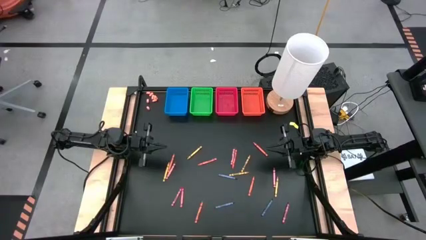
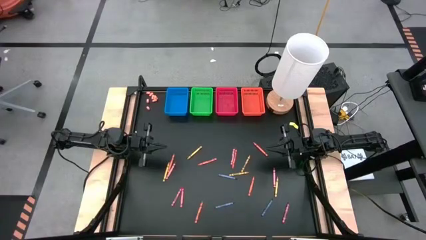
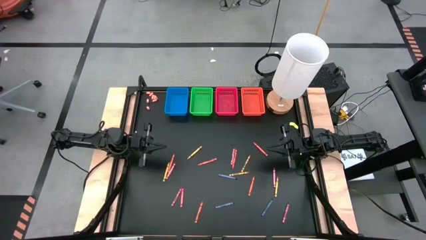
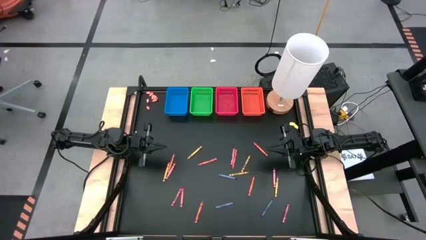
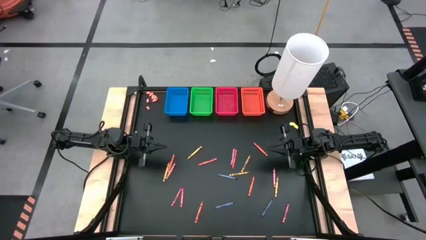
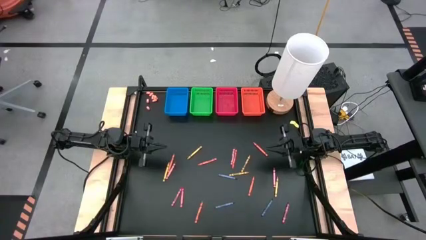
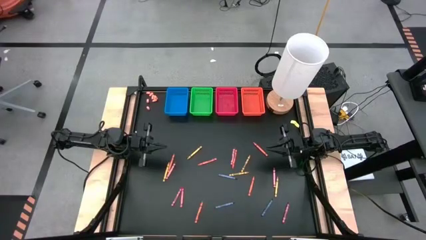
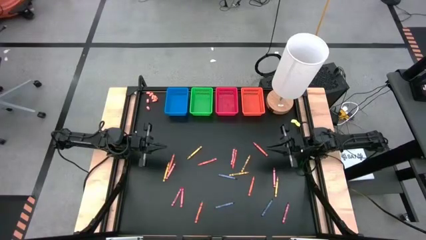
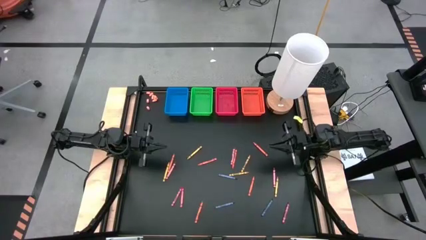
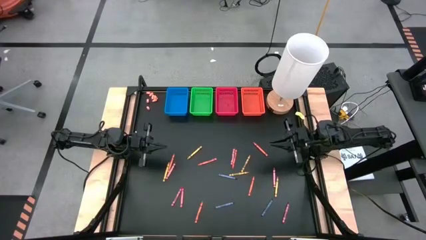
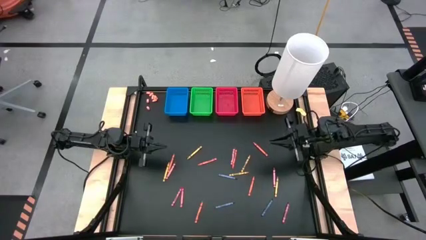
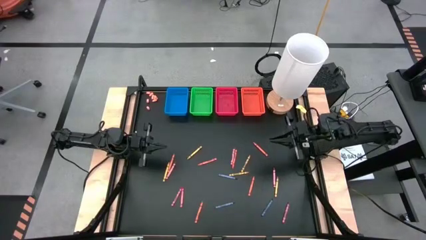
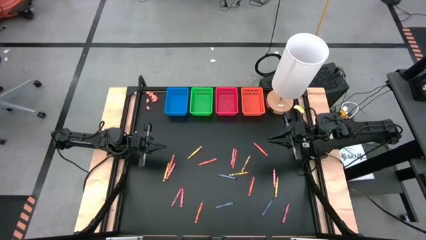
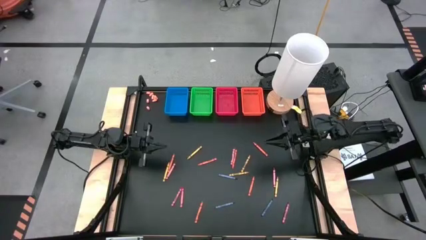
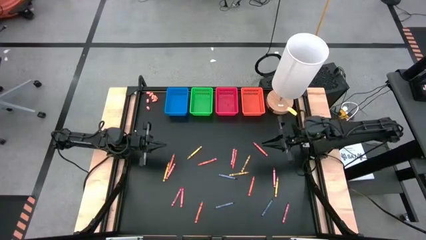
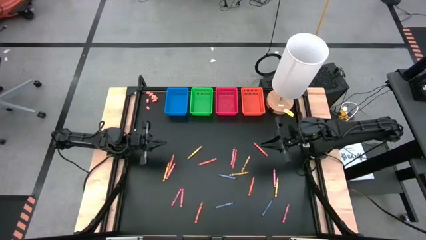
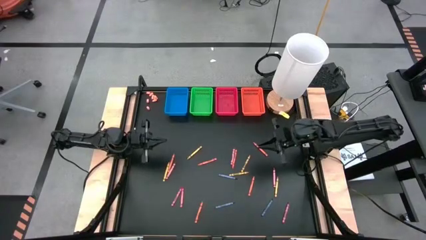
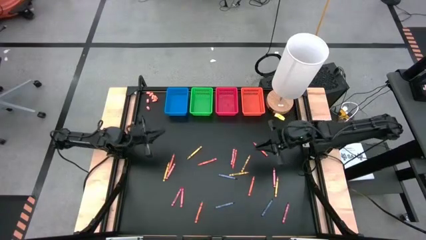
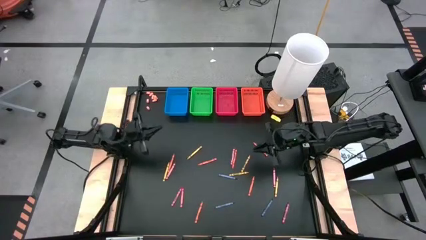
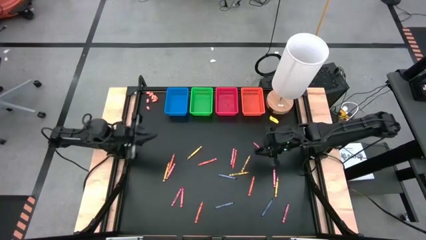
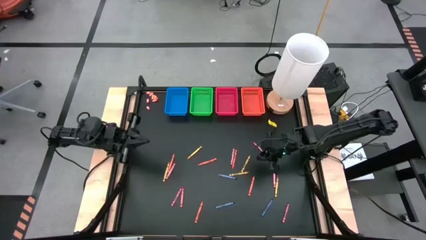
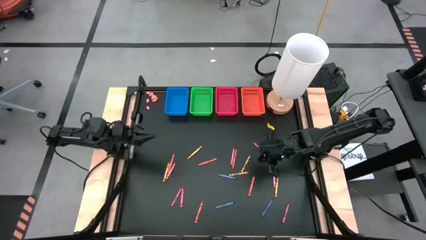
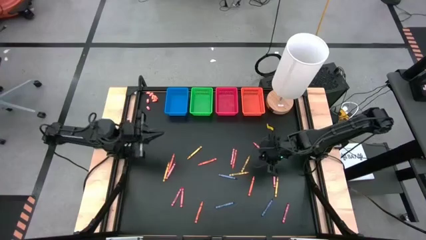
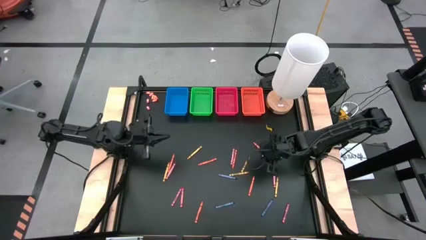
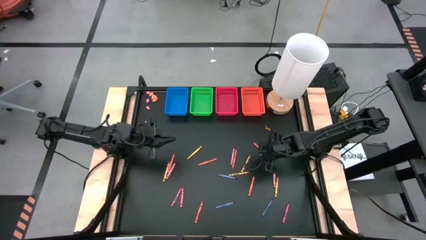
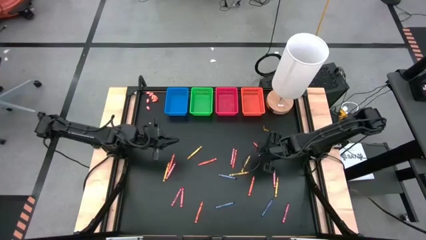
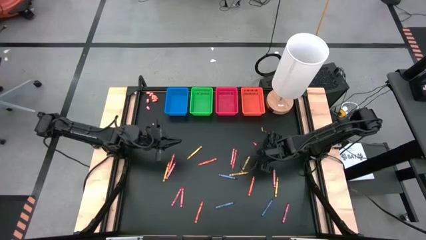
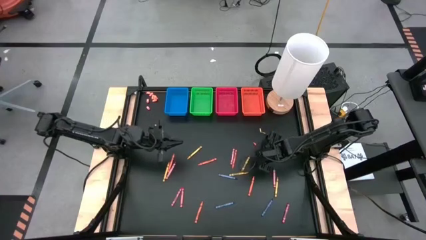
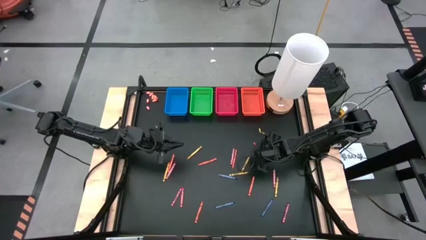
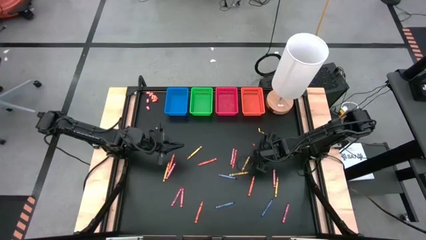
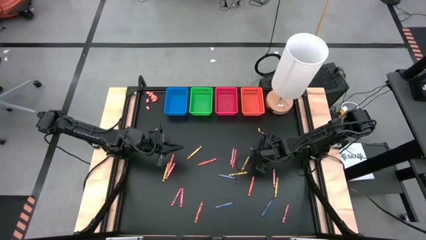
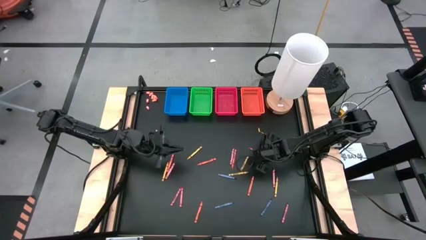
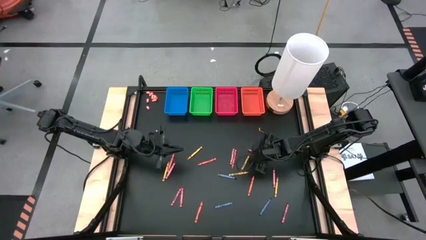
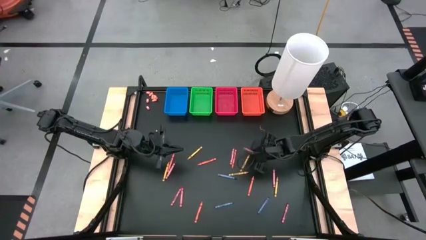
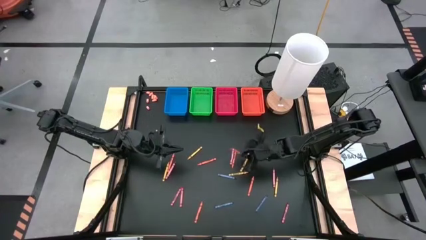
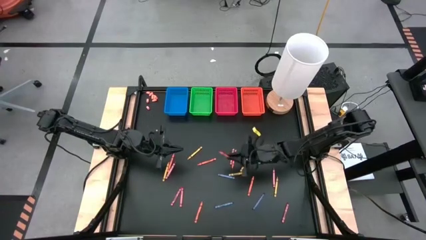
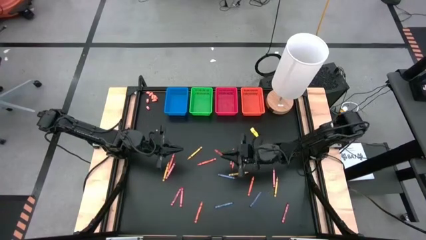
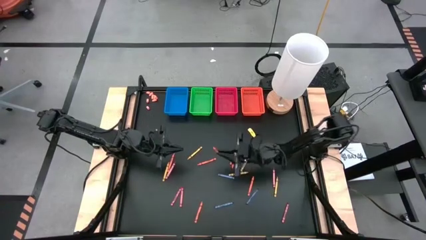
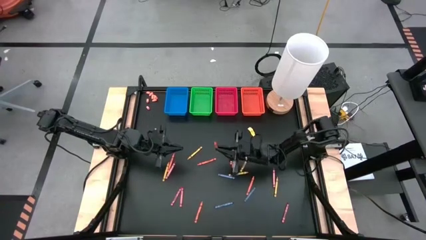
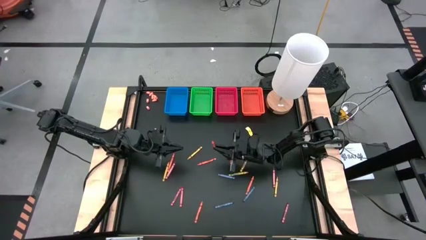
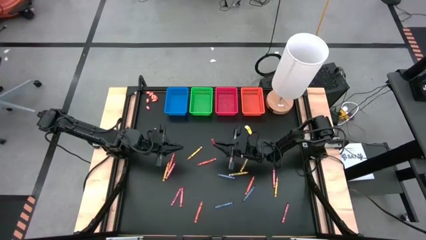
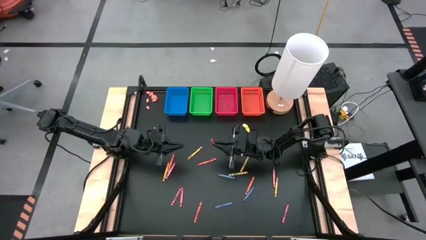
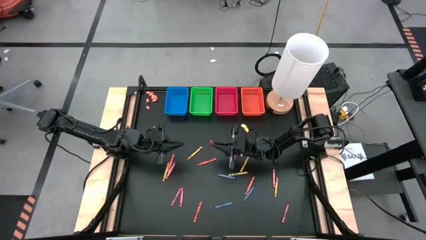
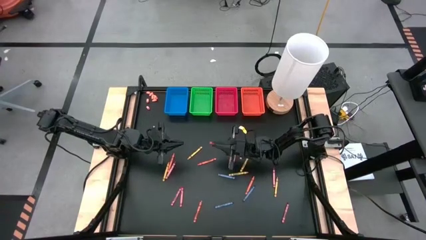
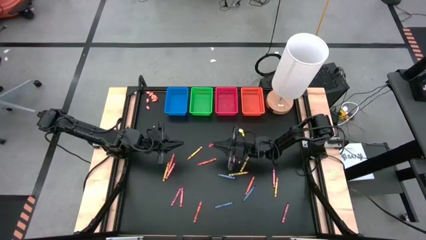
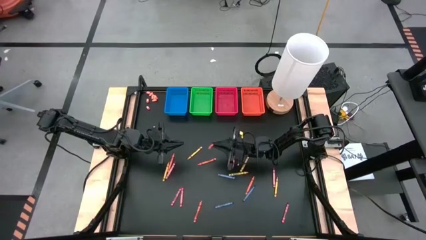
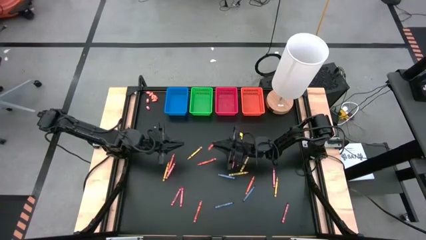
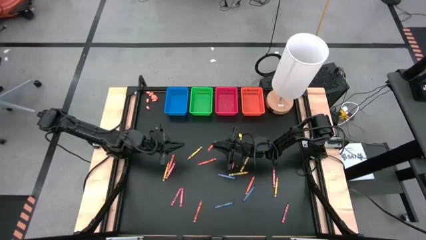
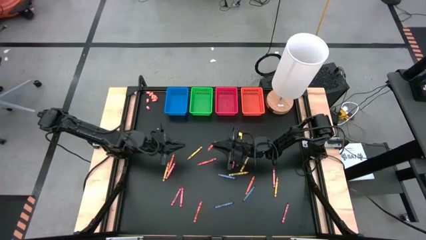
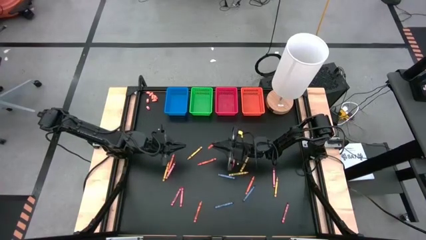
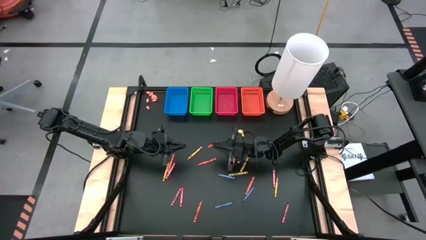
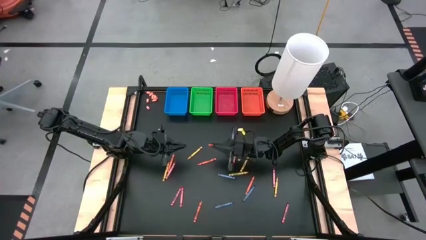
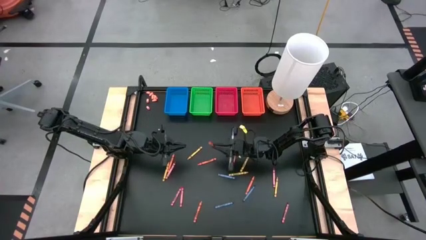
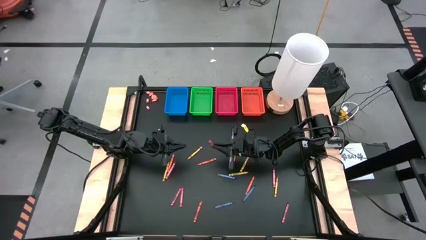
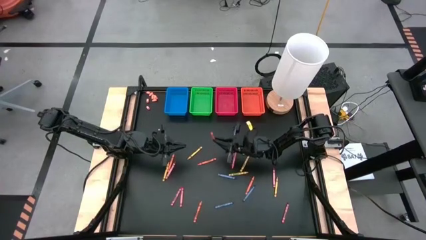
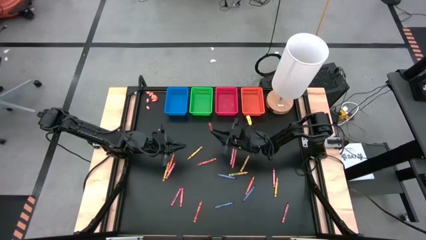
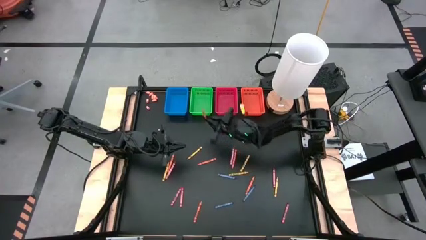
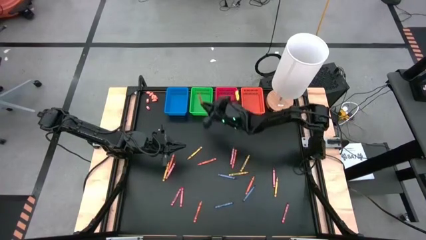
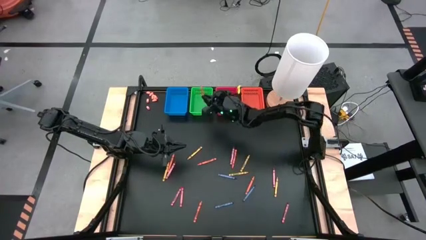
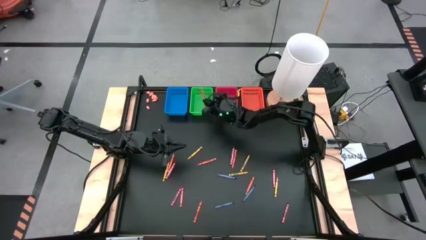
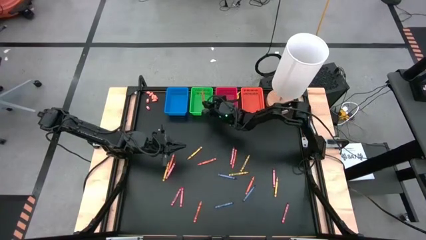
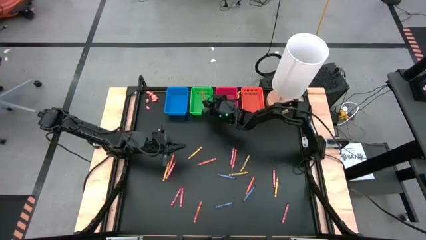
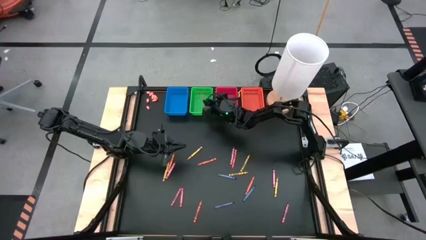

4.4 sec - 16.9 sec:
Task: Sort crayons
Put the orange crayon into the green bin
